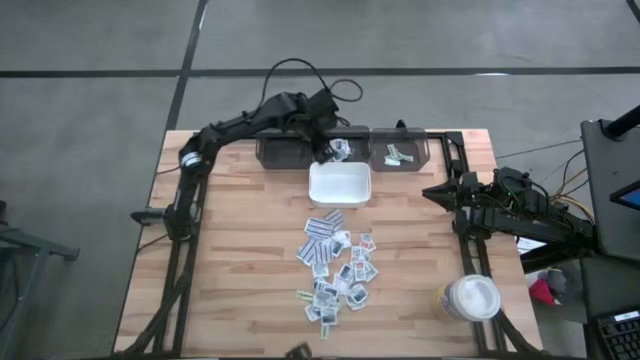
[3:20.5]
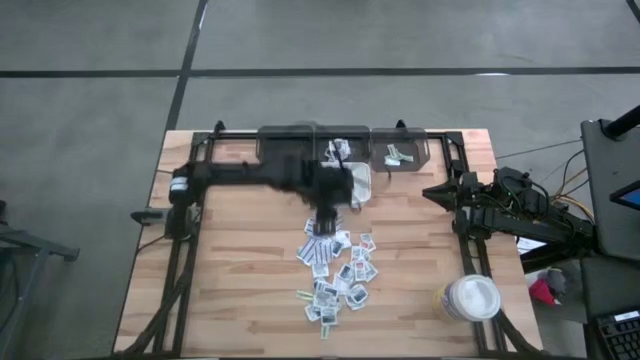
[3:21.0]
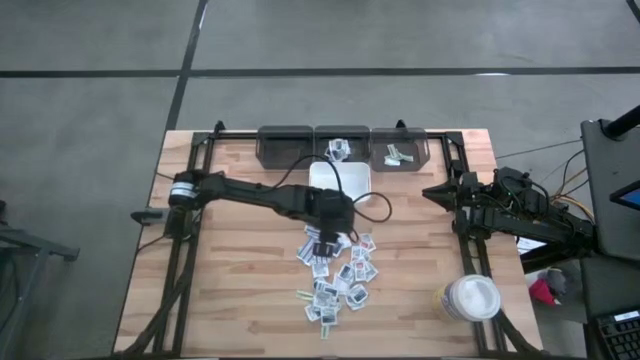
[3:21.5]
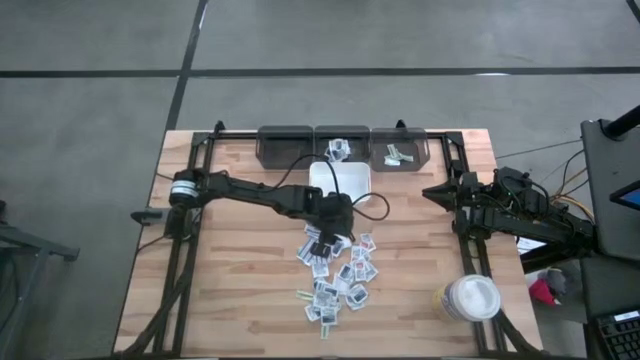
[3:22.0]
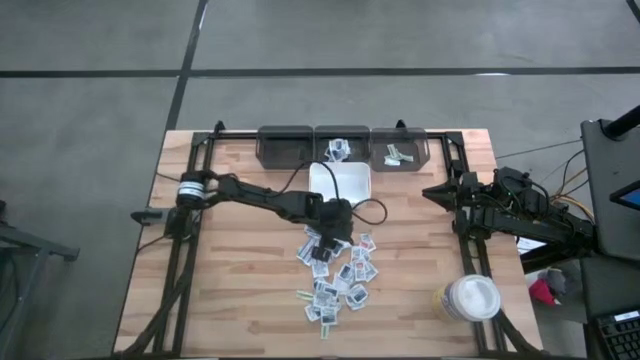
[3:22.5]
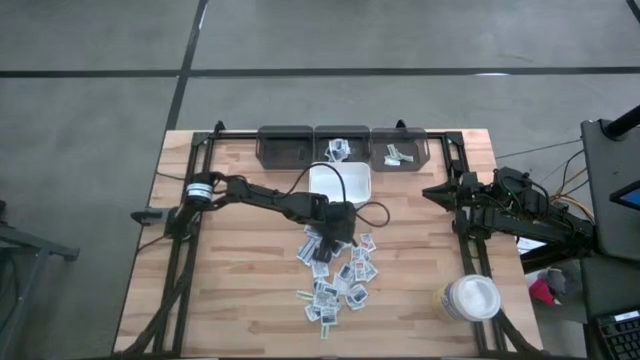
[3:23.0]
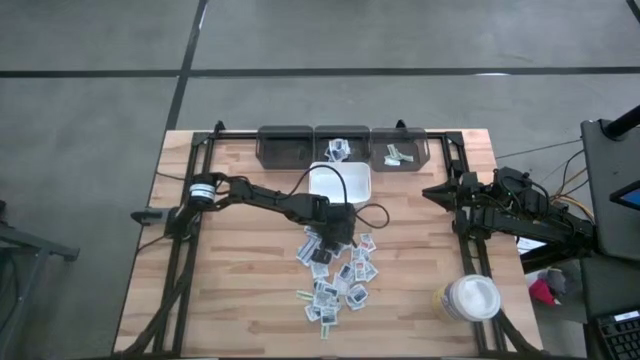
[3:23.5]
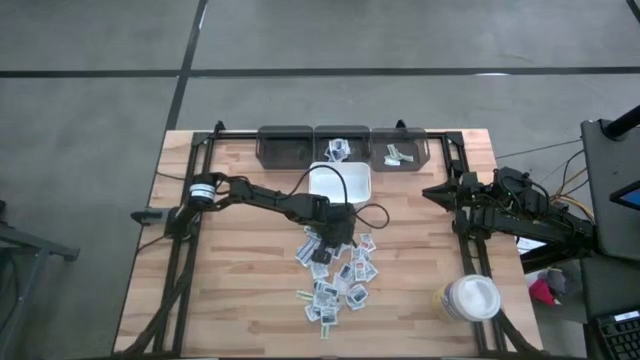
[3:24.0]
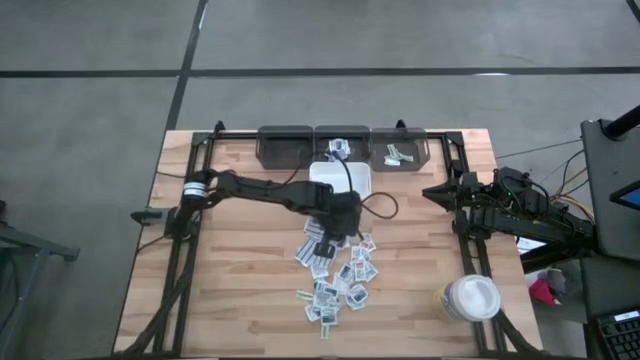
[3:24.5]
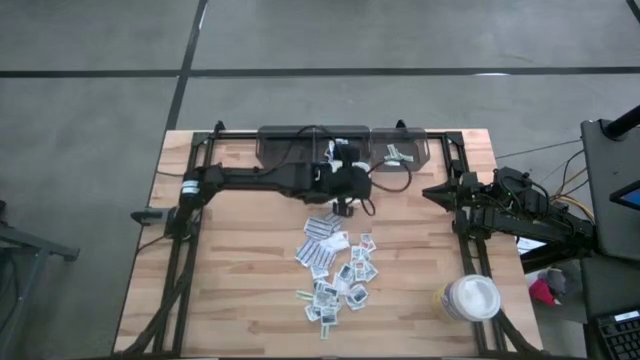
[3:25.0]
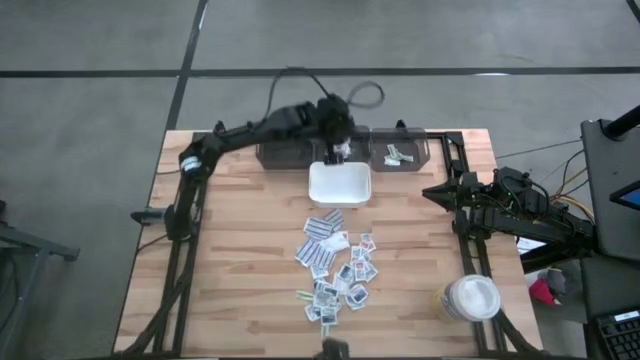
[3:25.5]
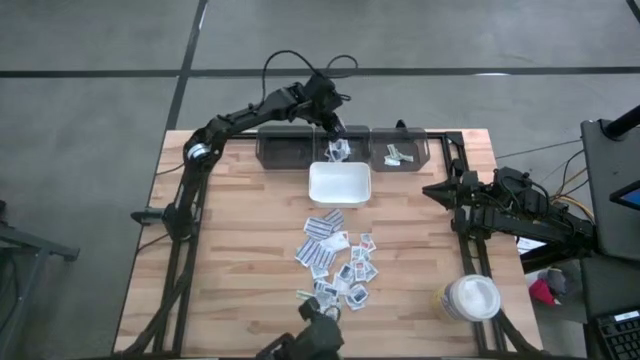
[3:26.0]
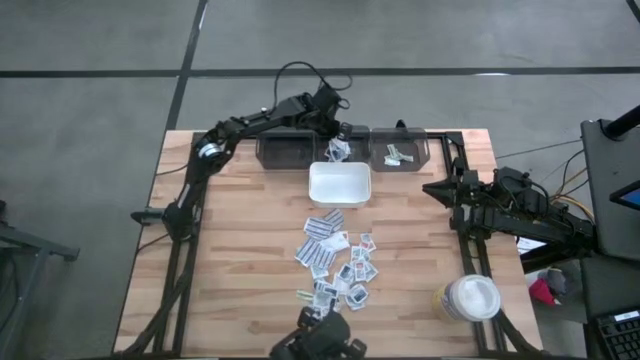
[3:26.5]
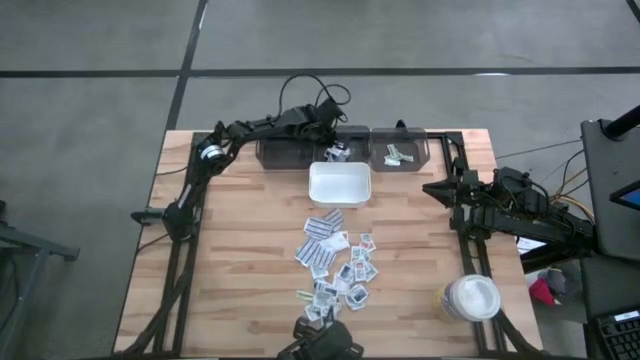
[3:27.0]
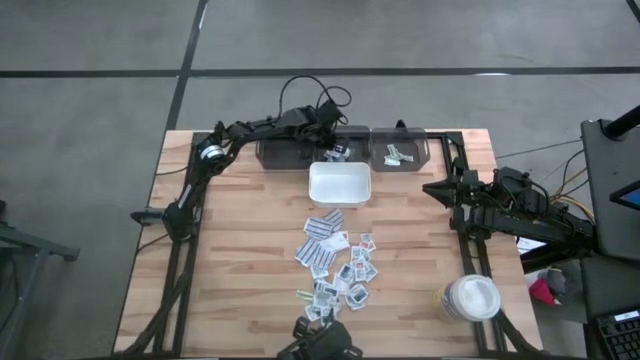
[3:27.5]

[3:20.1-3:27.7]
Task: Pick & Place First Aid Supplies
Put the blue alcohol pad into the middle gray bin

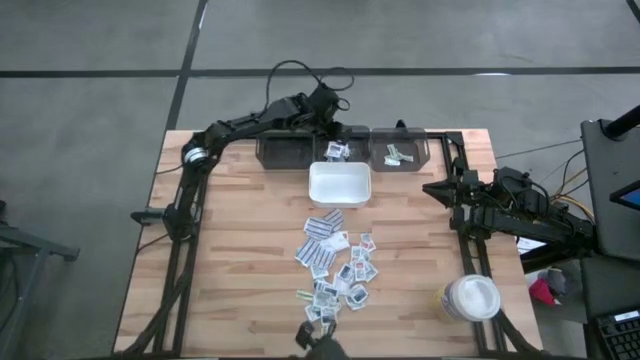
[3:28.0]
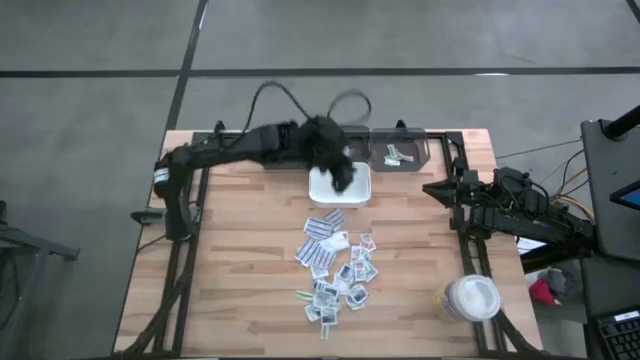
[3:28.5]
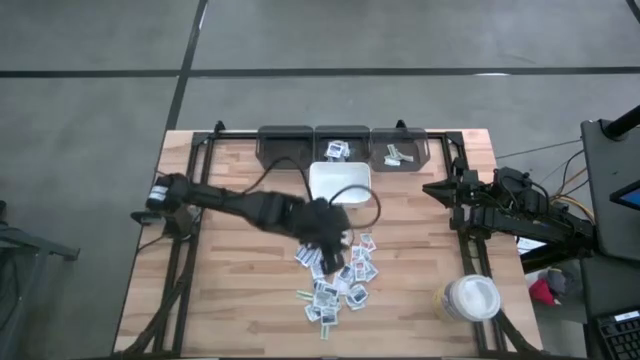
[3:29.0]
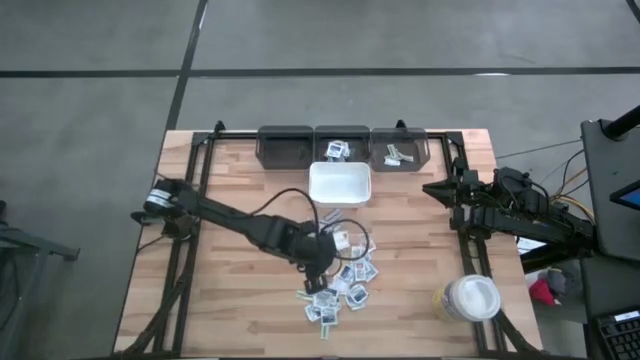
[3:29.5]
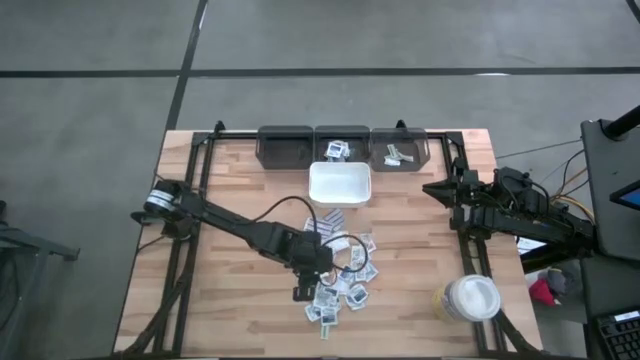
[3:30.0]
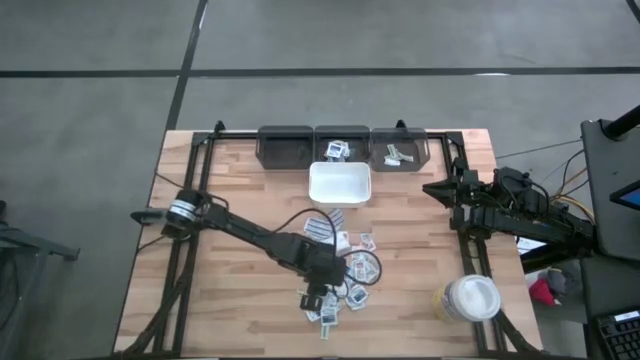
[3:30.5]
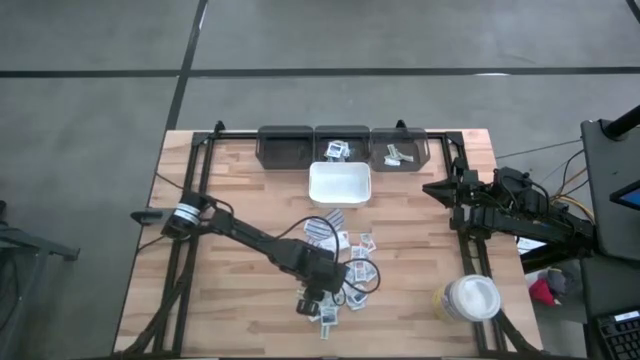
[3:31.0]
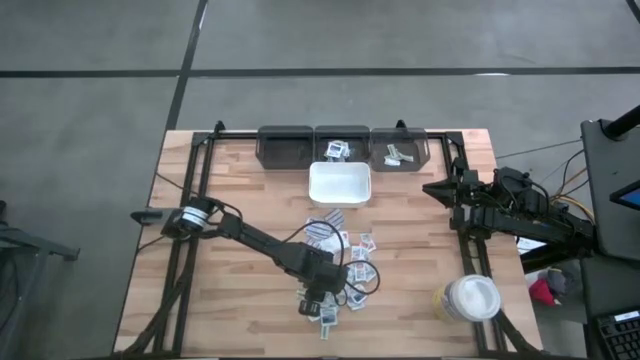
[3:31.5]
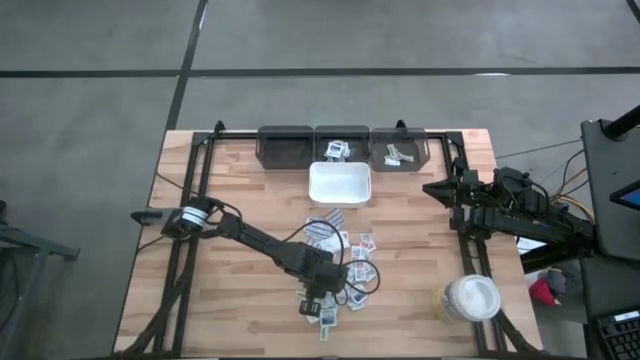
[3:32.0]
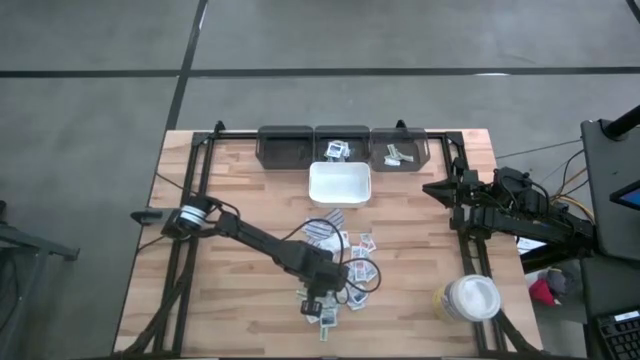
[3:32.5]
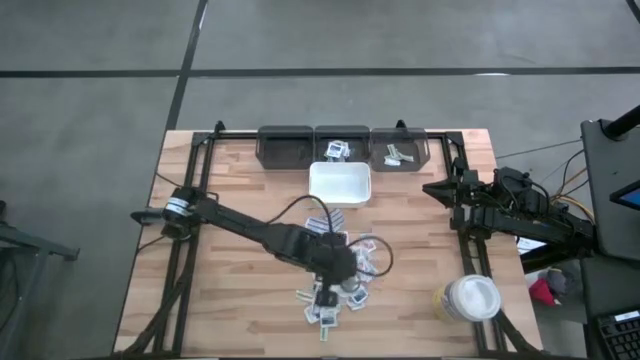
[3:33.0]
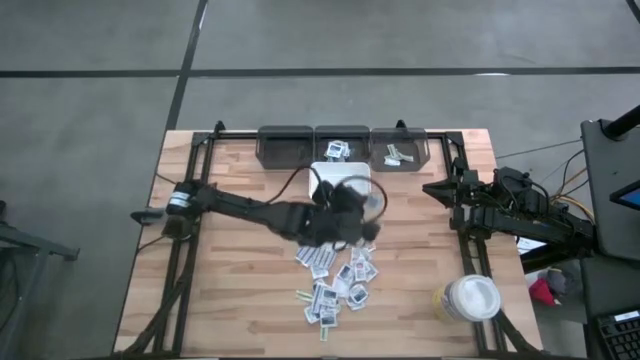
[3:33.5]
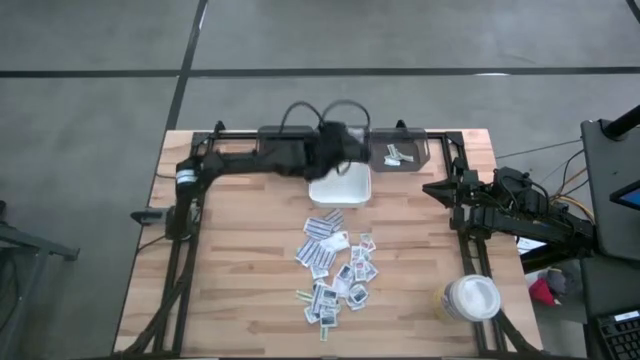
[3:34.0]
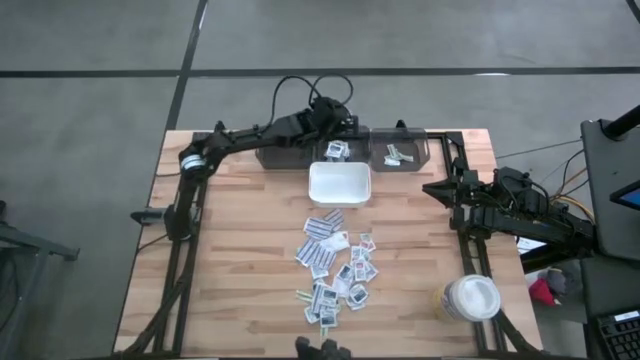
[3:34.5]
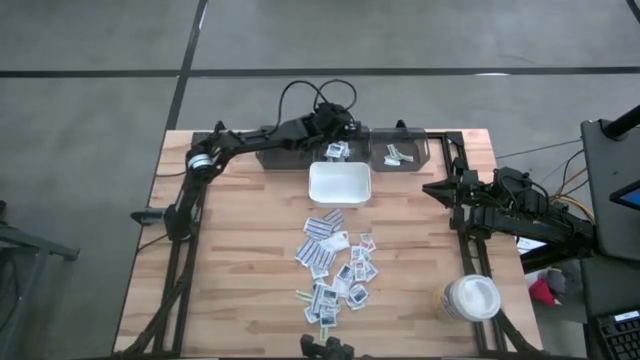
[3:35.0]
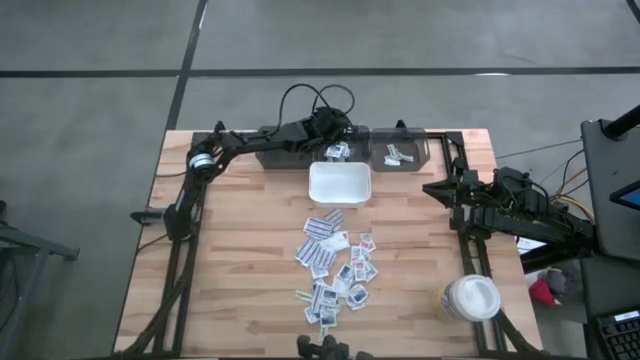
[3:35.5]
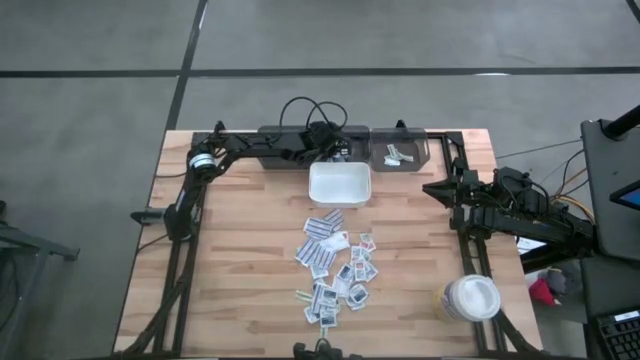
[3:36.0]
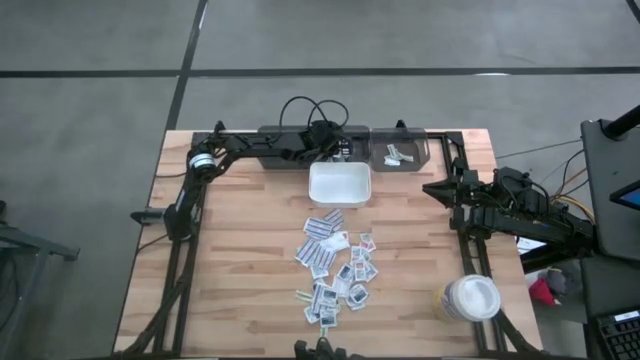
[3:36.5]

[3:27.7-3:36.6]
Put the blue alcohol pad into the middle gray bin

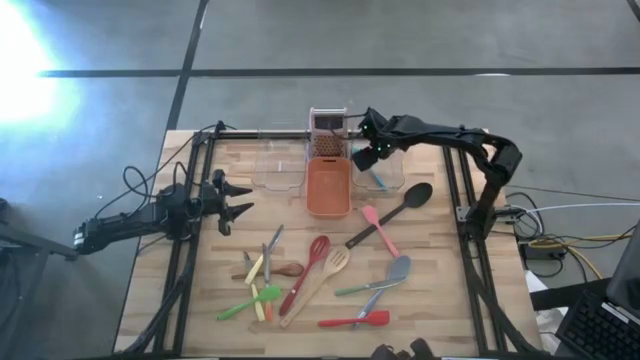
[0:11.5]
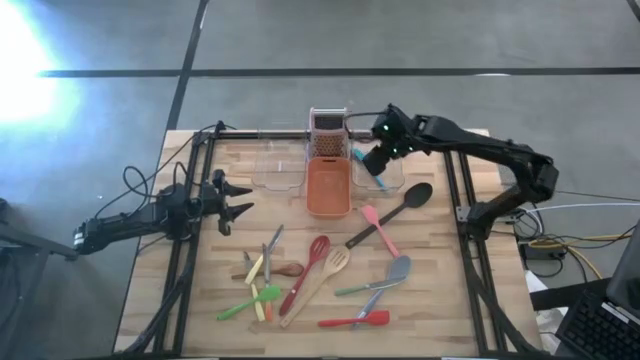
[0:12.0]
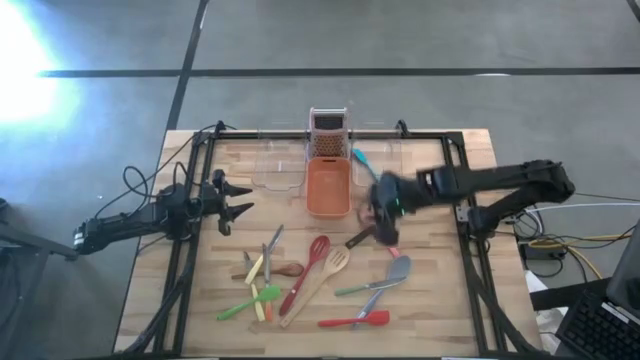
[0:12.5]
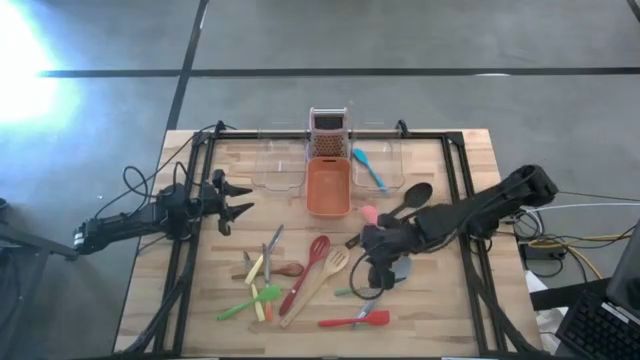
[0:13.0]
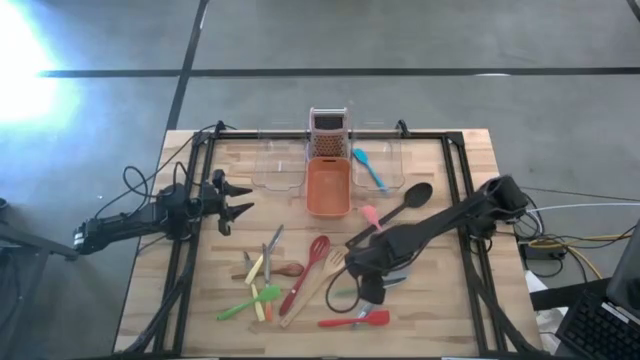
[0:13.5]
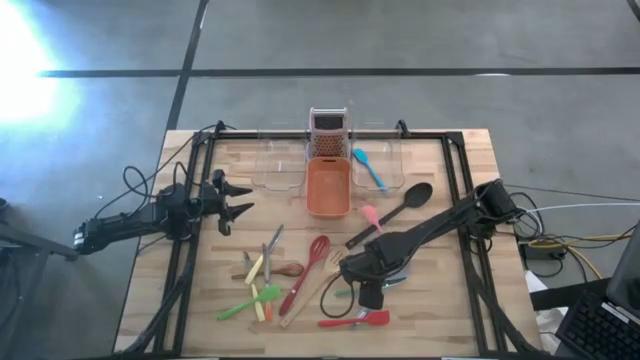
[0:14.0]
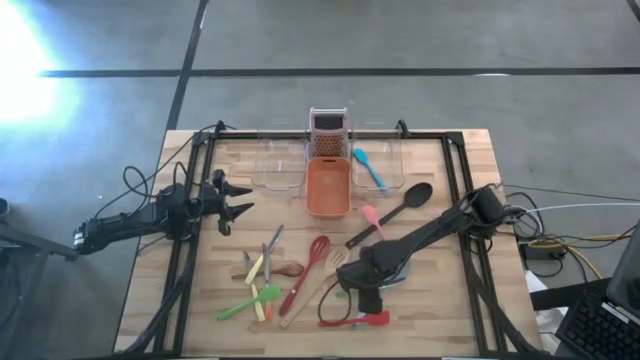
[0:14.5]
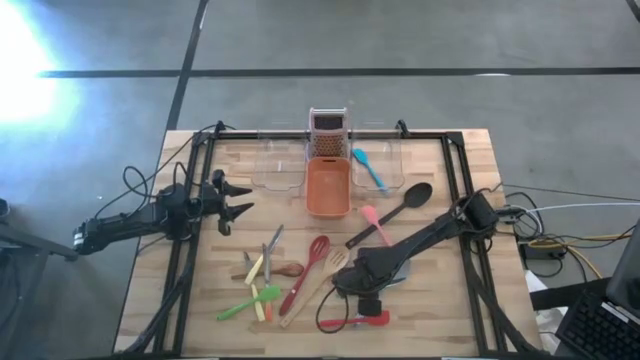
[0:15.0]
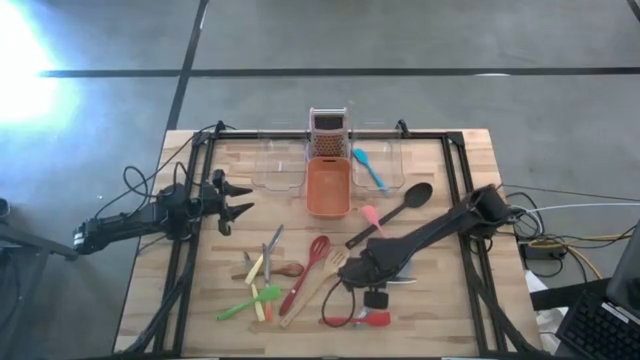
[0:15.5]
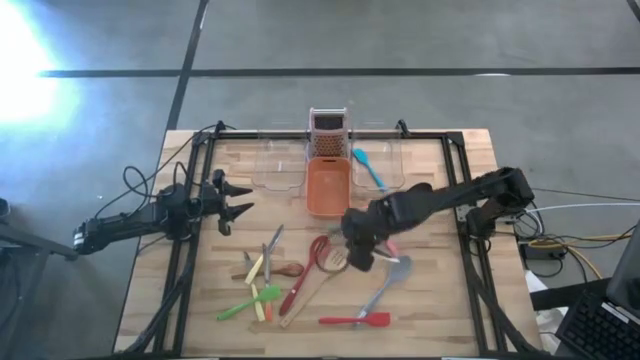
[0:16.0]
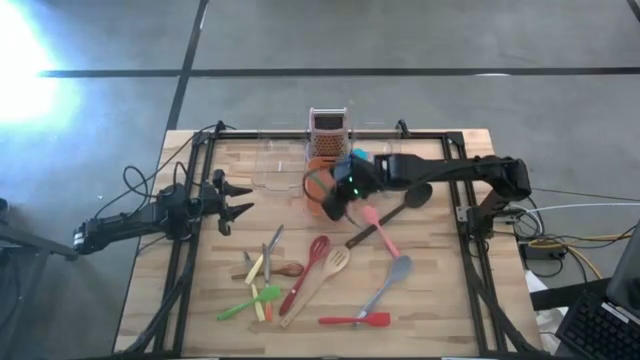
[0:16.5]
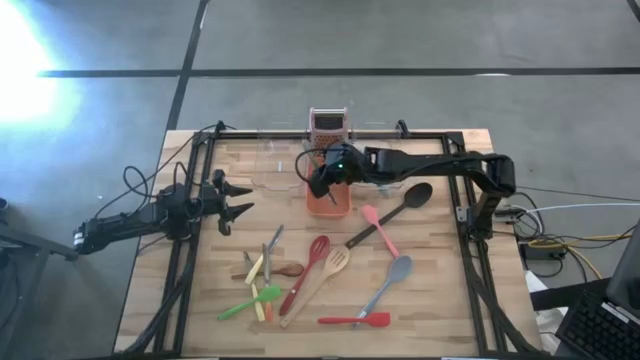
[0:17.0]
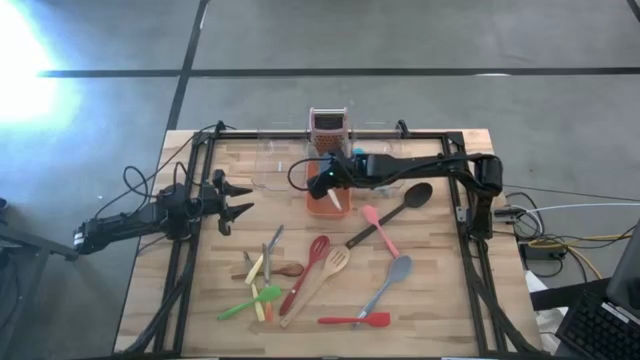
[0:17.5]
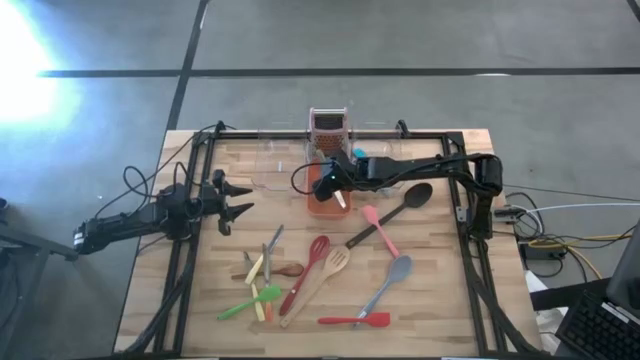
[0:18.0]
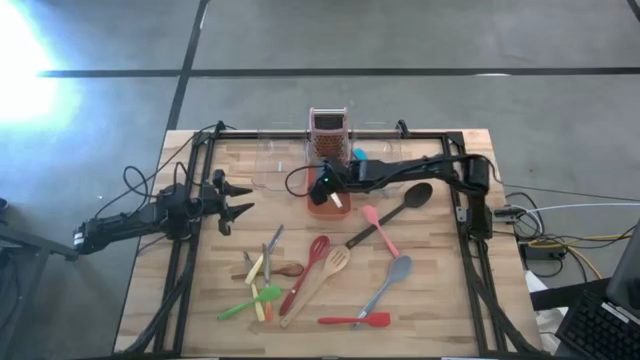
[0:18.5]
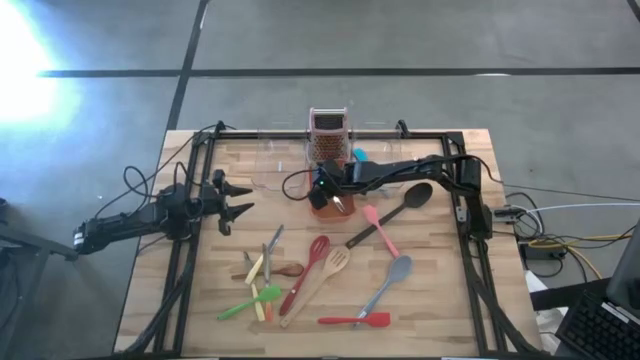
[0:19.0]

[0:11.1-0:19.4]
Task: Pick & Place Kitchen Items
Put the green table knife into the orange bin
